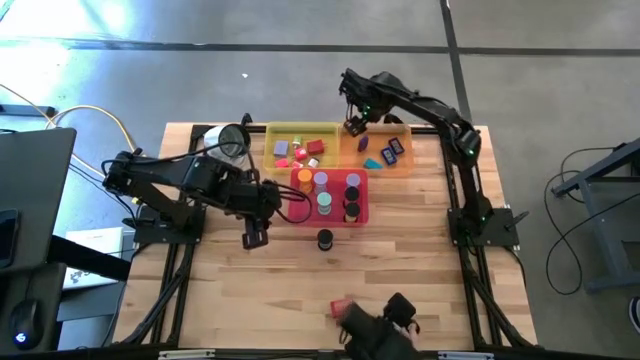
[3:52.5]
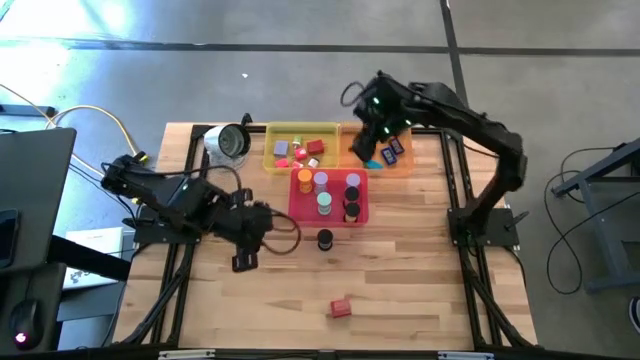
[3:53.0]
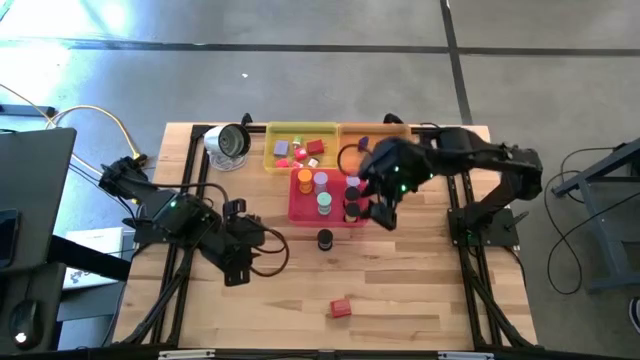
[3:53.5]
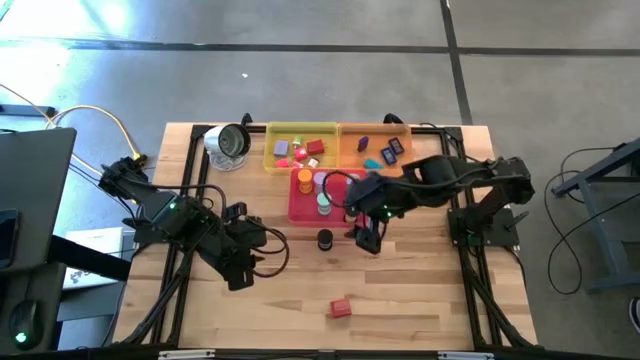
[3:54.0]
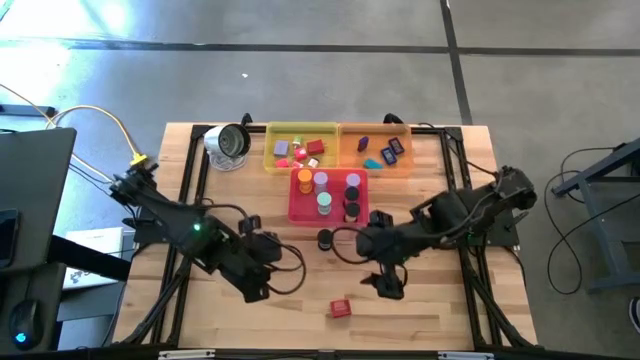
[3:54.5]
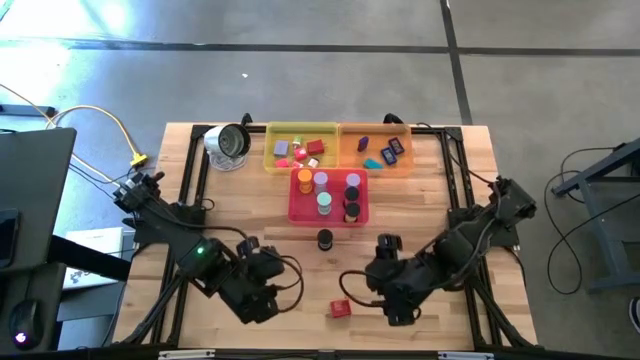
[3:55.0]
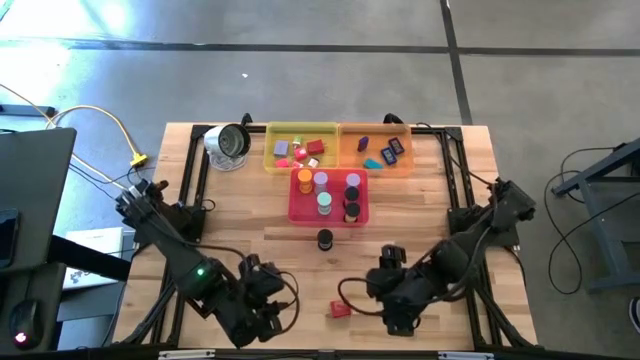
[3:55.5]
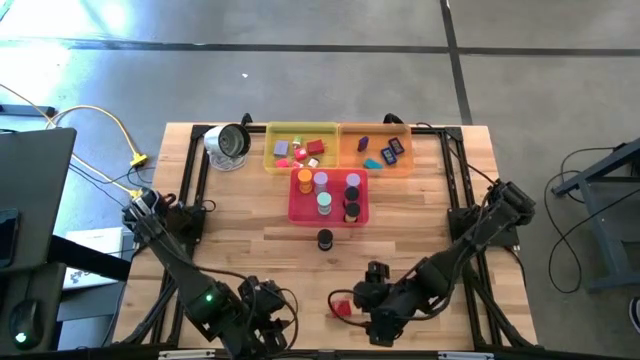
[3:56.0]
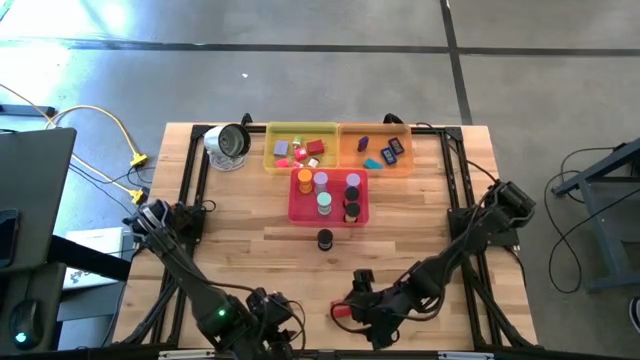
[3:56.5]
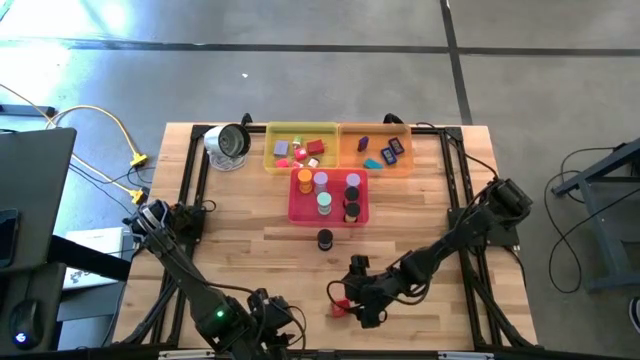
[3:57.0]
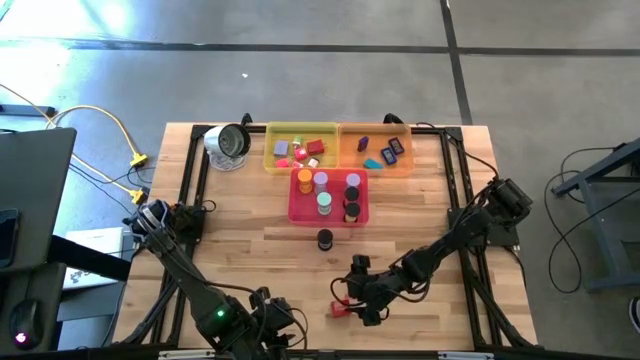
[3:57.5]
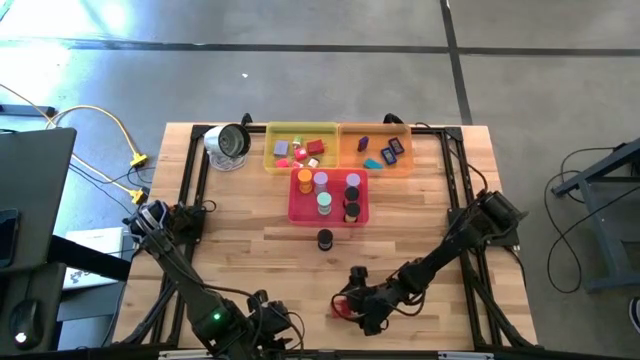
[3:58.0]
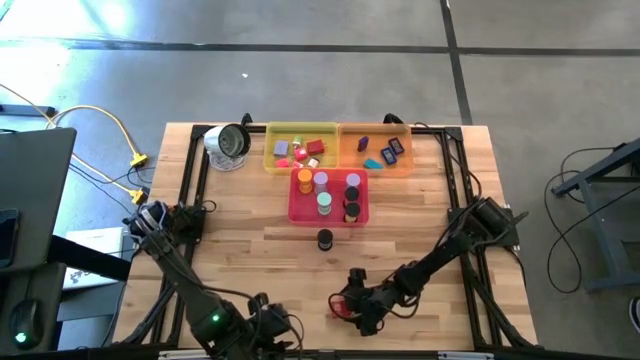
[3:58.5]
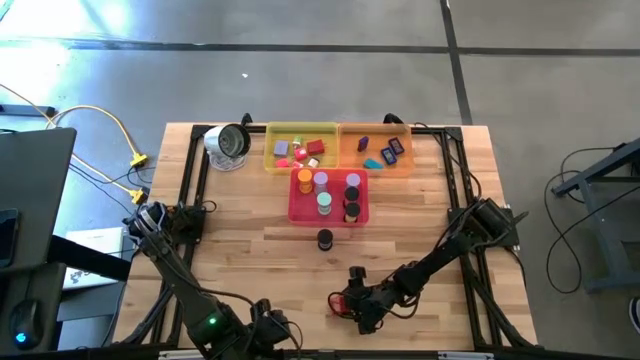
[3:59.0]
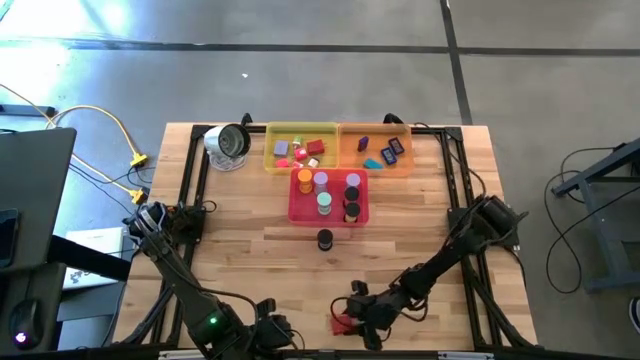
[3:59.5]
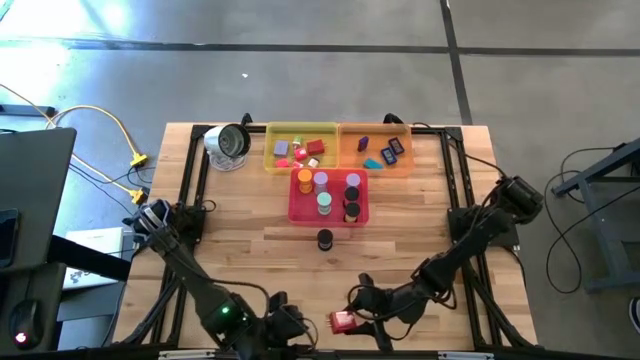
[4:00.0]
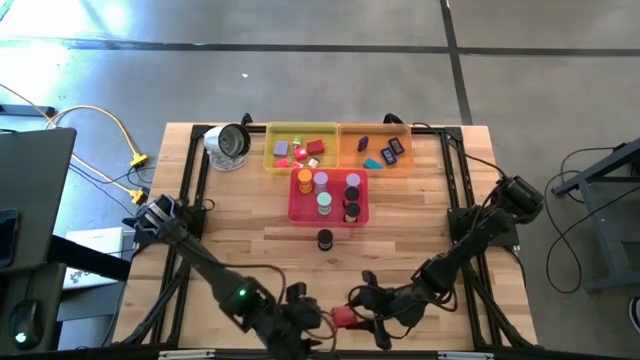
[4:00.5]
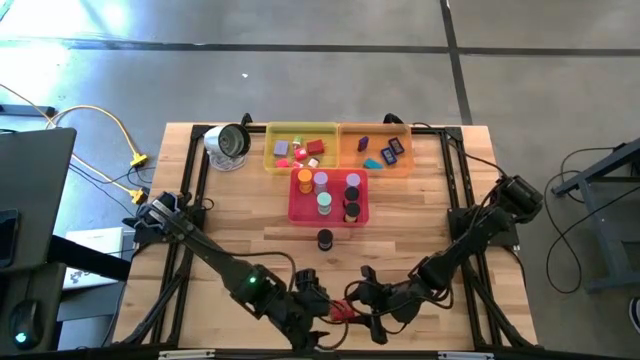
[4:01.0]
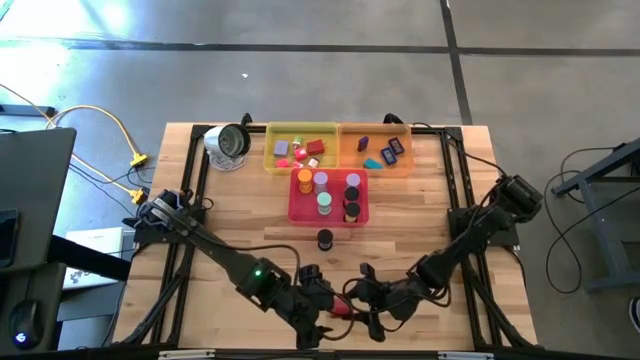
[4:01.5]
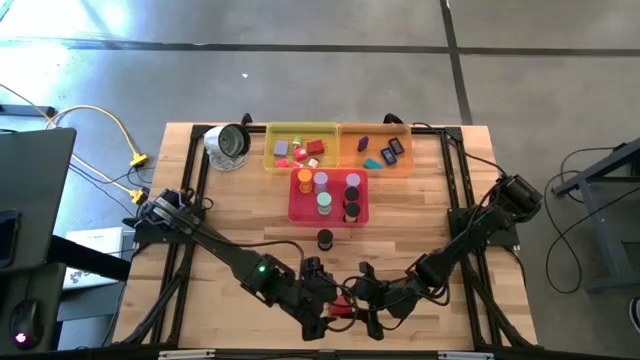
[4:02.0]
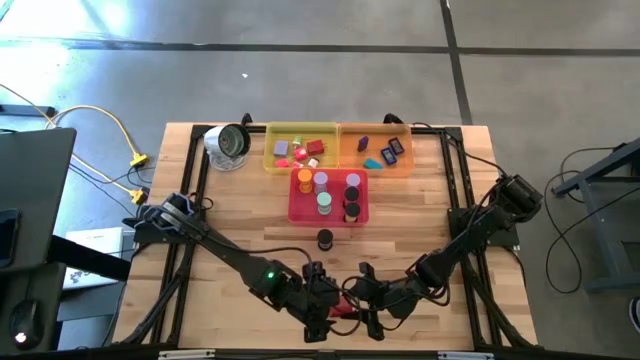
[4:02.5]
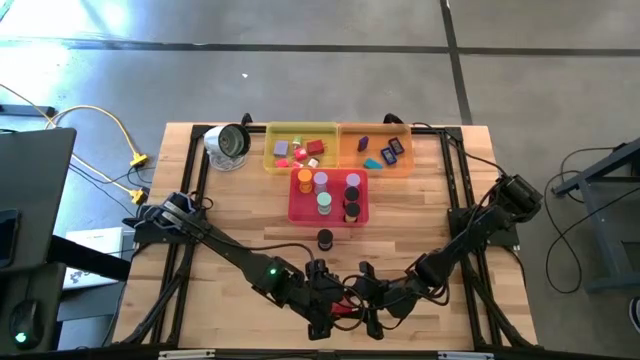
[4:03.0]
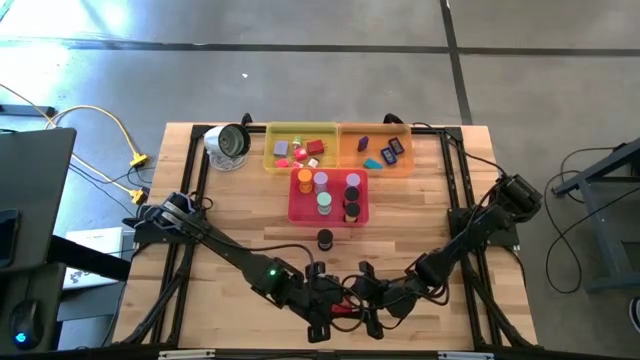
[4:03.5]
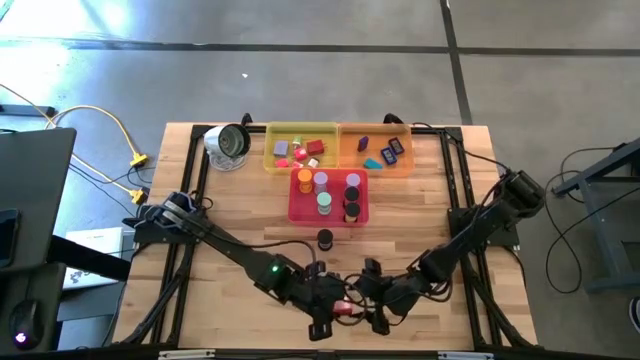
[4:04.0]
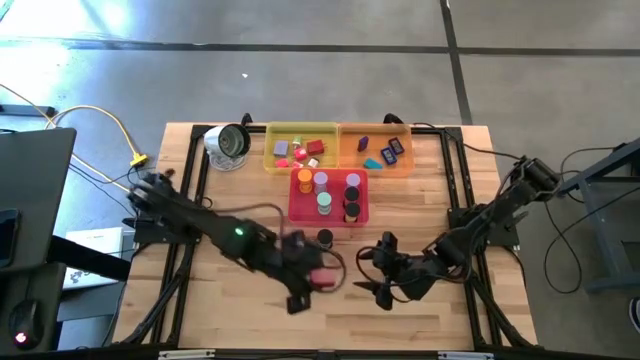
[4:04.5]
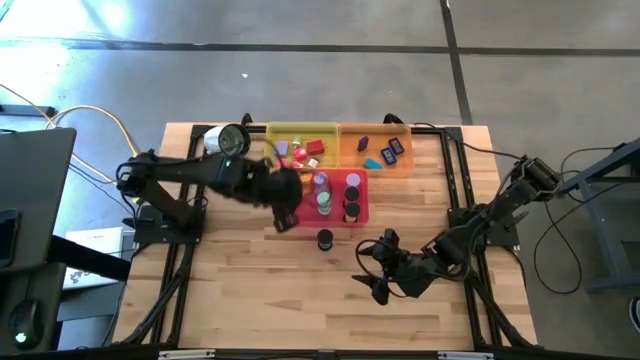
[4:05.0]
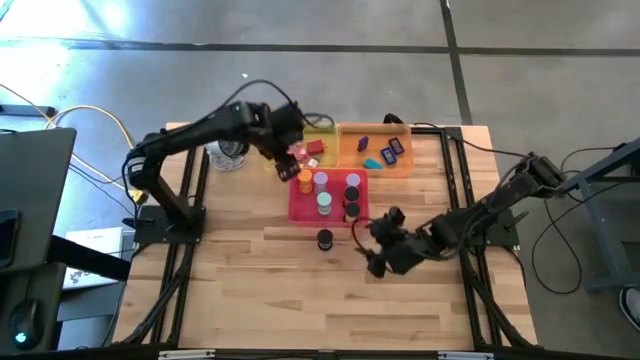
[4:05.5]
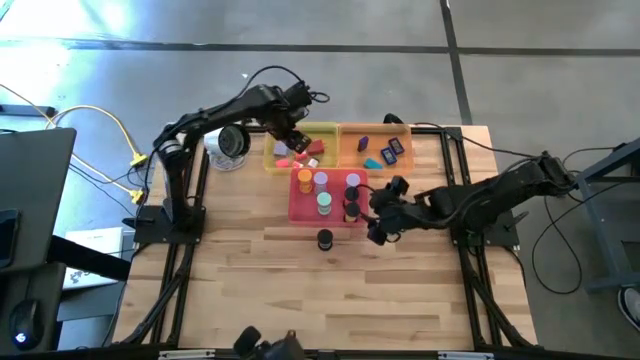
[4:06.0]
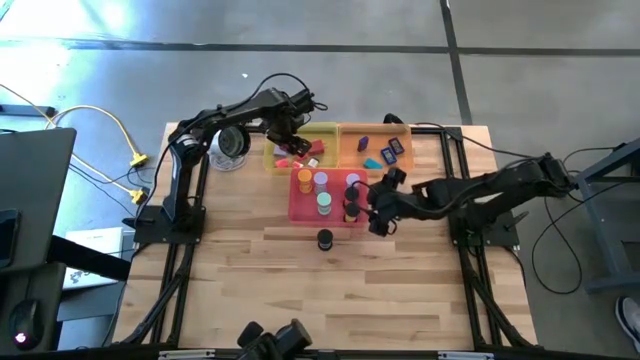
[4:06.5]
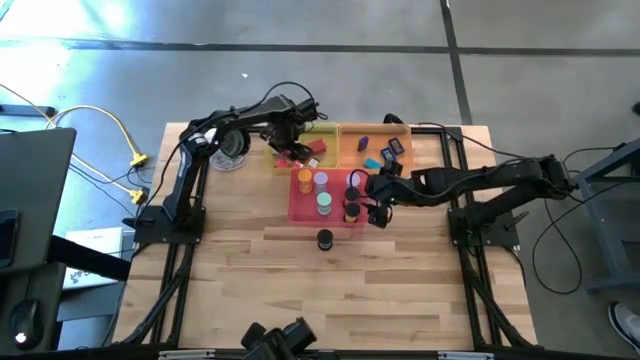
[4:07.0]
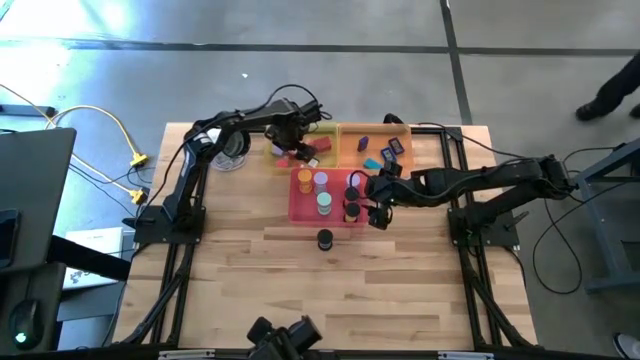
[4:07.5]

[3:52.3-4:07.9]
Task: Pick & Place Office items
Put the red charger adapter into the yellow bin

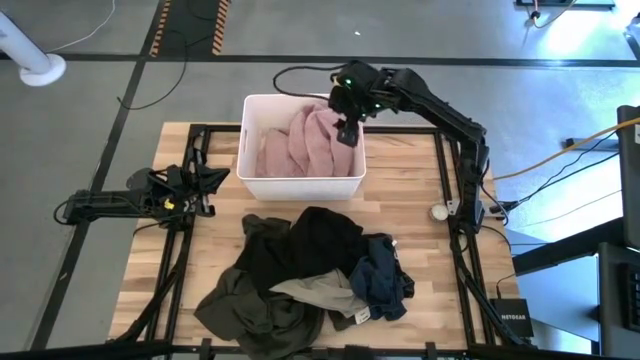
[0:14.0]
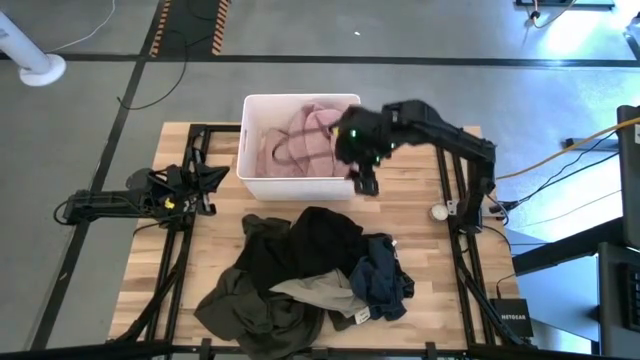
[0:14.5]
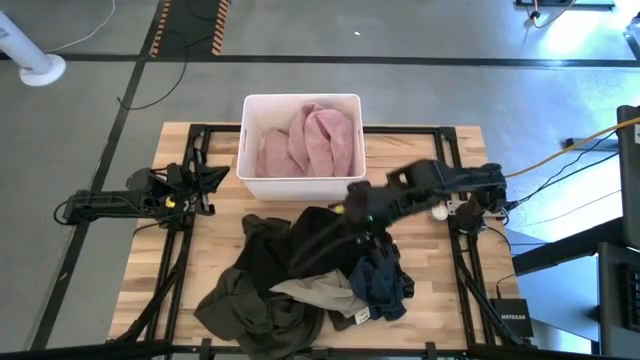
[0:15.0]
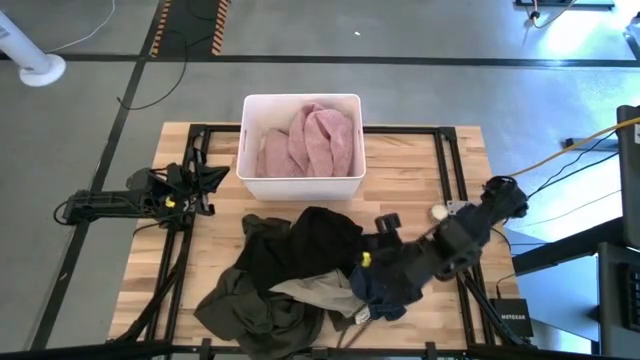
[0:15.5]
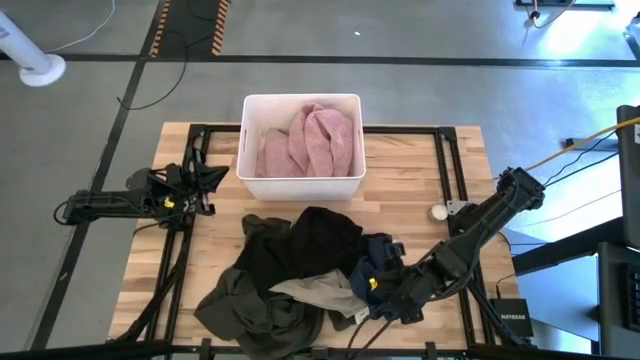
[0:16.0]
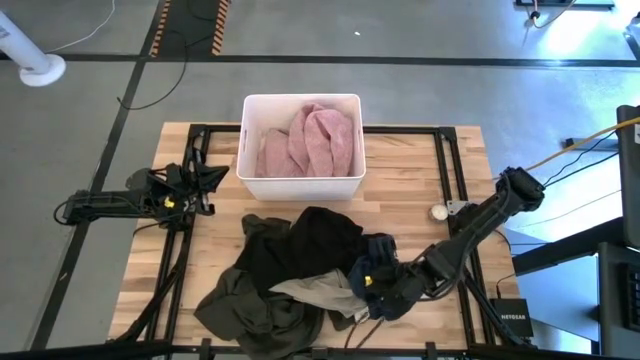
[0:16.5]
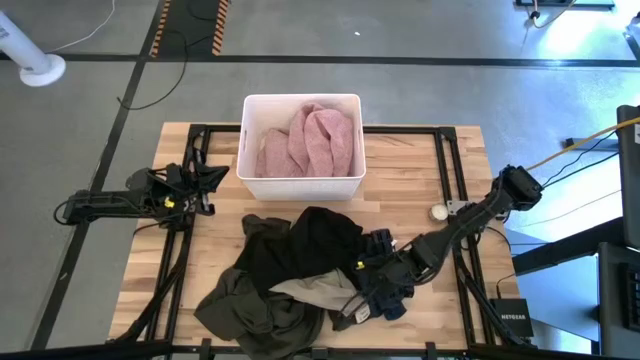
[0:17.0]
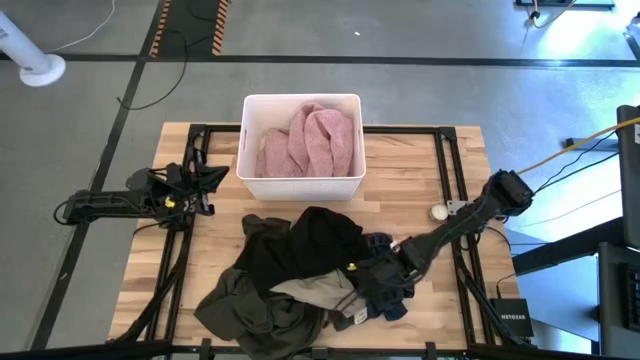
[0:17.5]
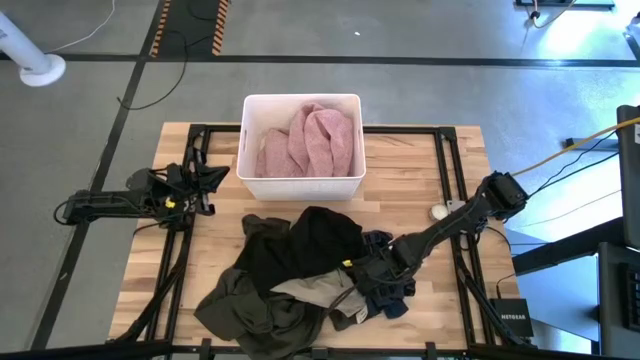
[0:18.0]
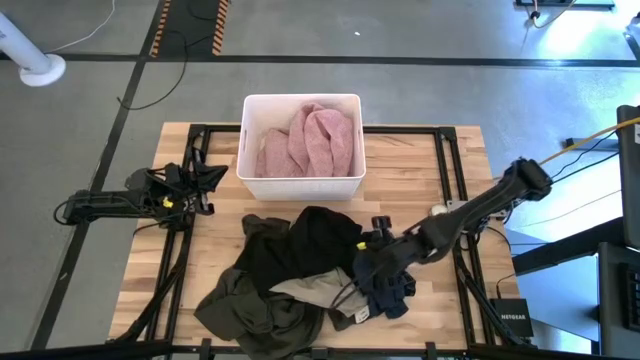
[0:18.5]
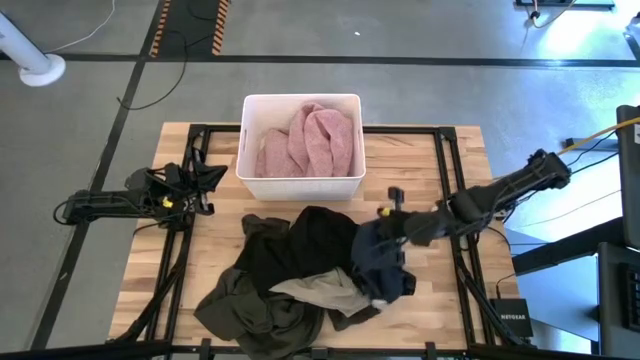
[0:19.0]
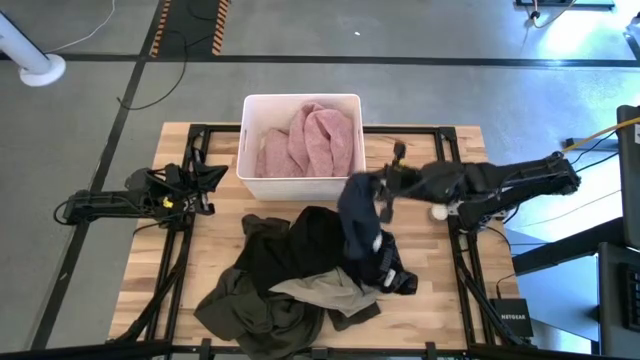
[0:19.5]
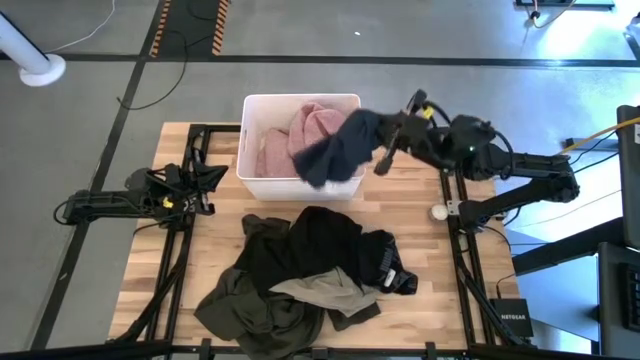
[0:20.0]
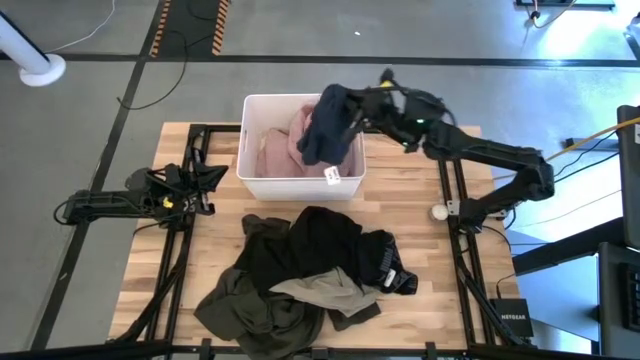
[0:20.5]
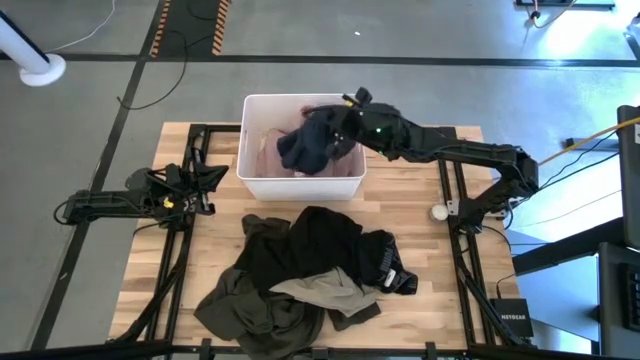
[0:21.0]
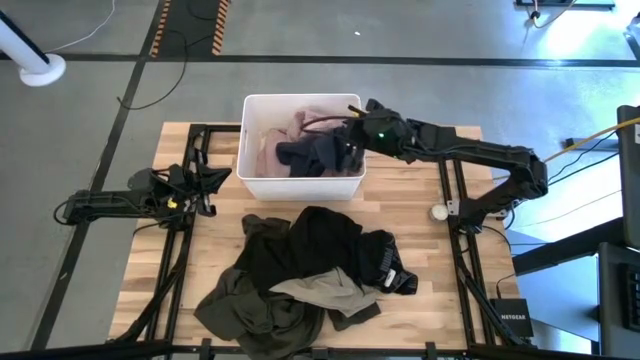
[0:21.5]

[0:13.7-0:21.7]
Task: Sort clothes
Put the blue boxer into the white laundry organizer
